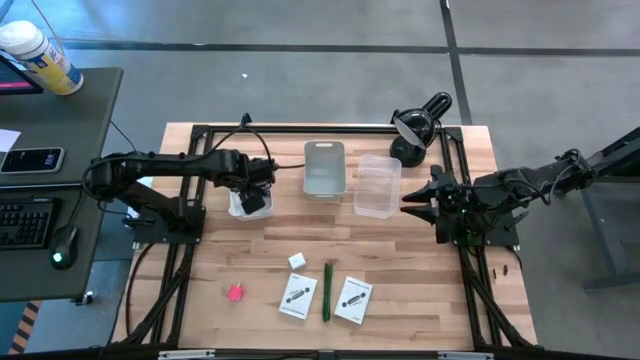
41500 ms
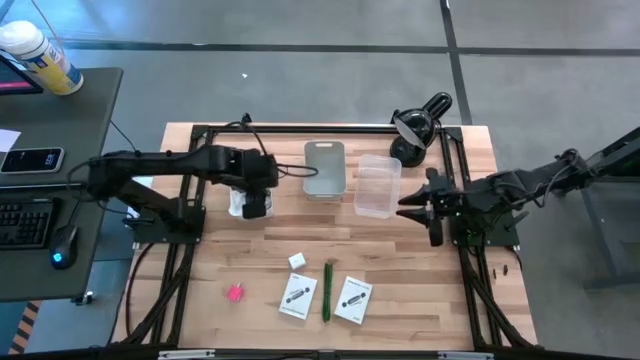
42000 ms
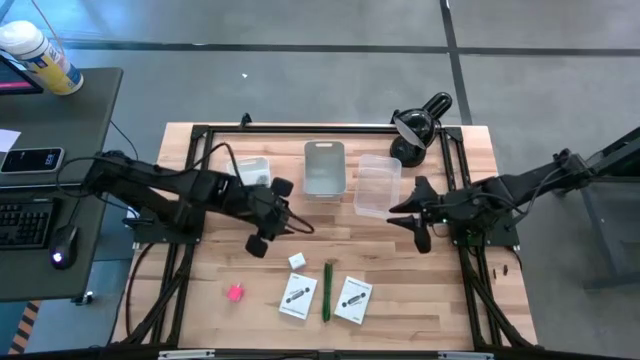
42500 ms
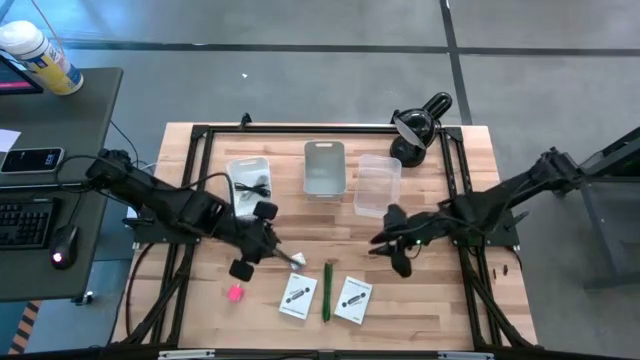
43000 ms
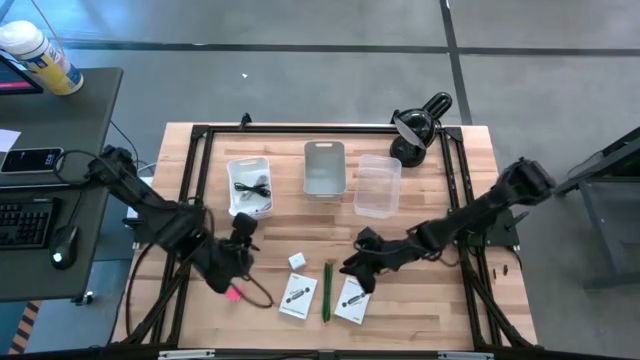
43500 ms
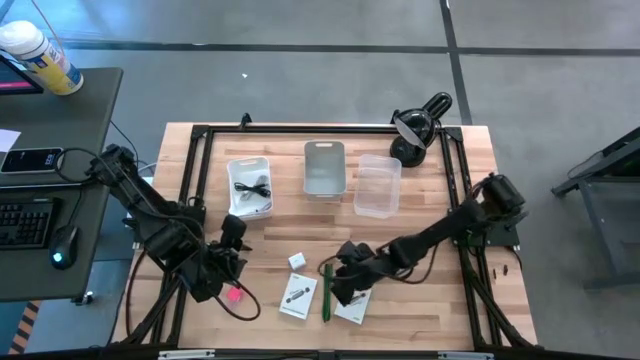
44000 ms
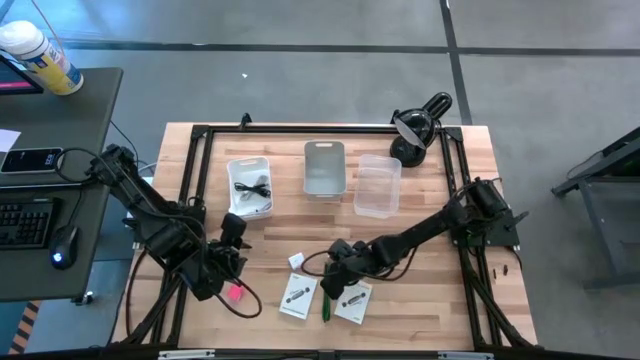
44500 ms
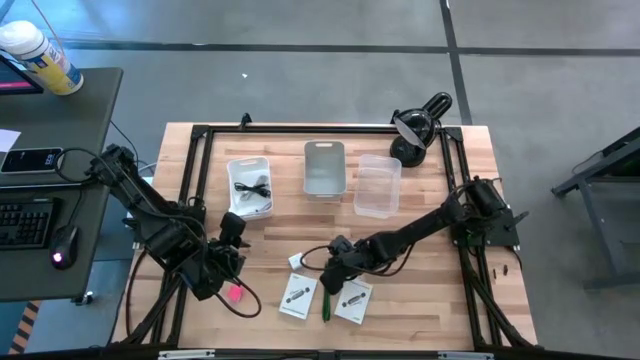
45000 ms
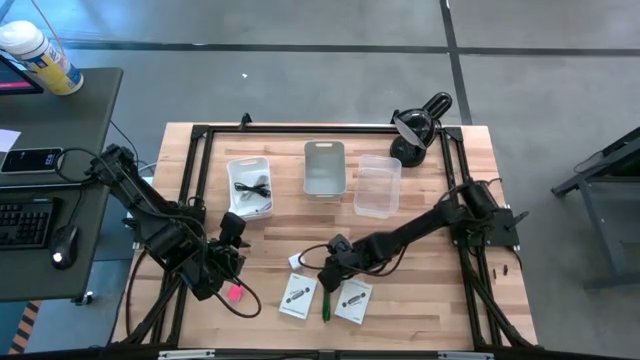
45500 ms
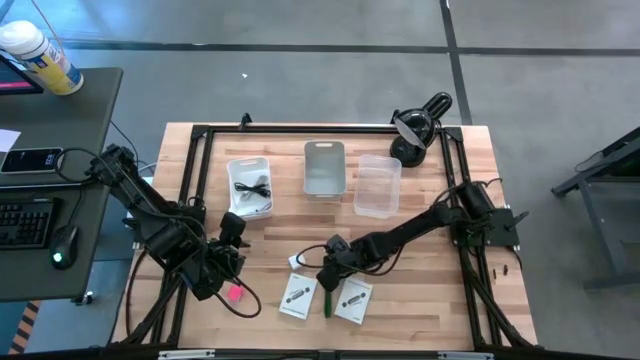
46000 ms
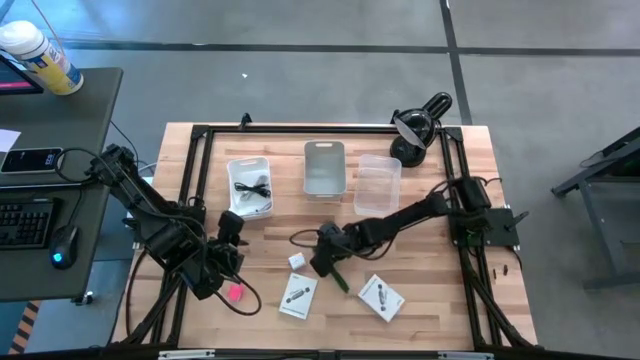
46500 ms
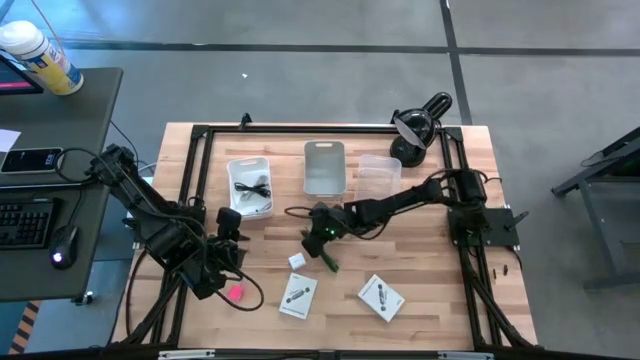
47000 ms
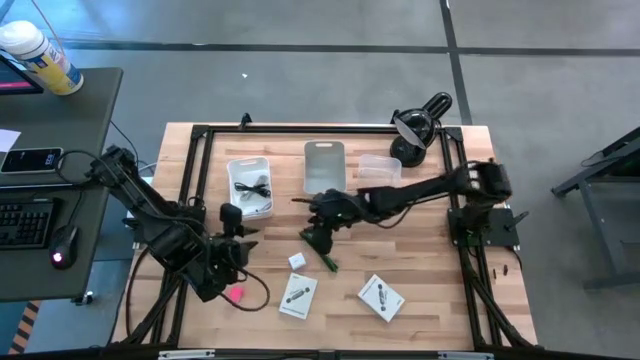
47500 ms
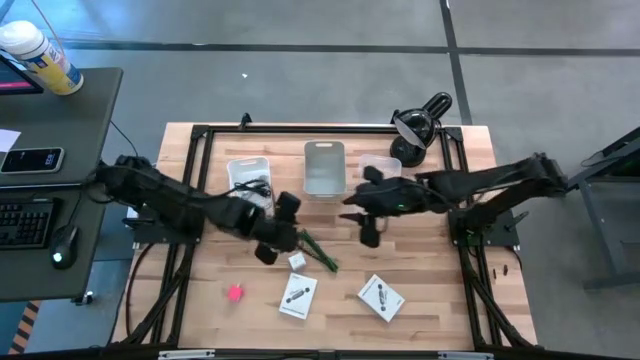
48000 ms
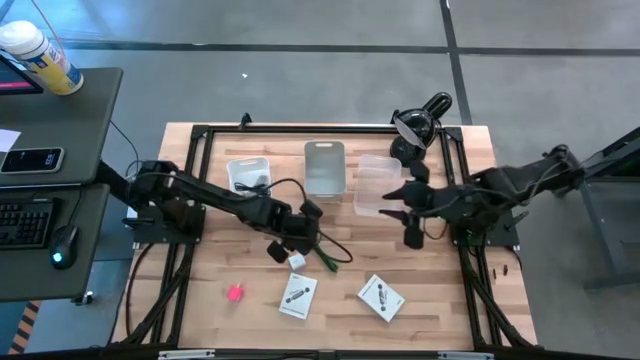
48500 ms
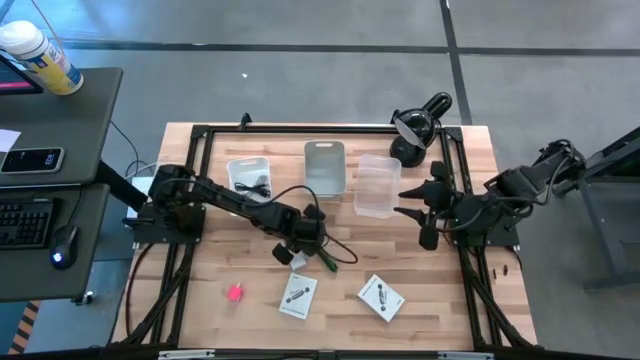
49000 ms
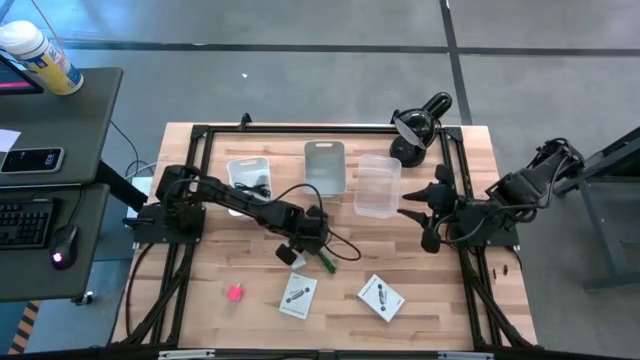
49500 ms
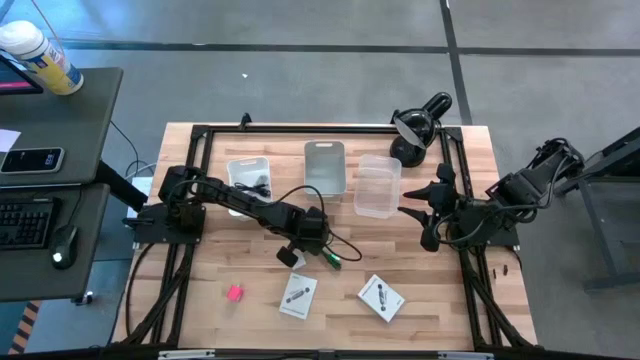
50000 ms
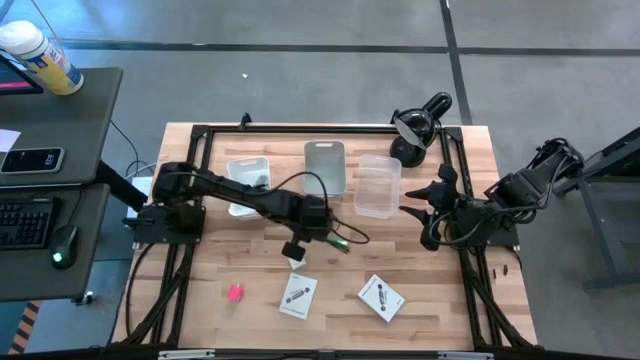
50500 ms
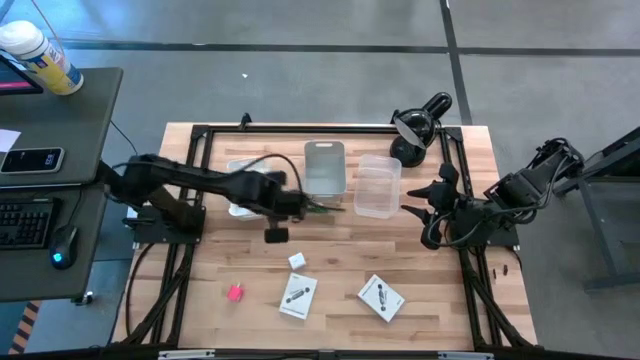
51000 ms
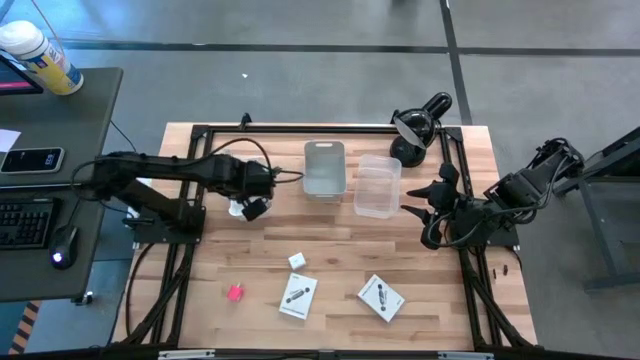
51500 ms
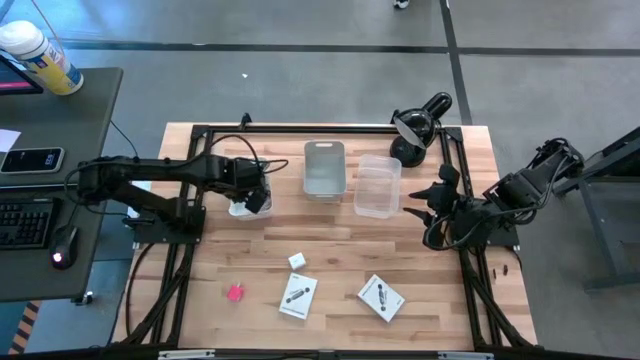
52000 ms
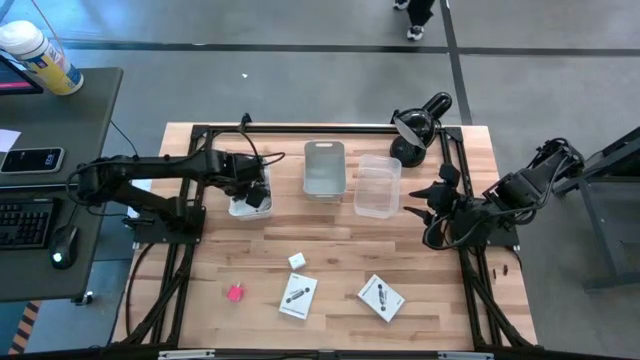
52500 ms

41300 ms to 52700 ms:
Task: Pick and place items into bin
Put the green USB cable into the white bin

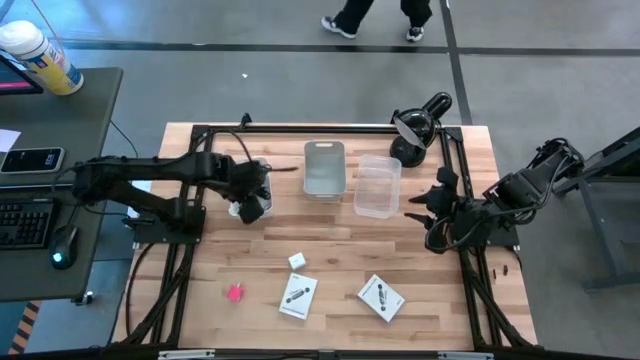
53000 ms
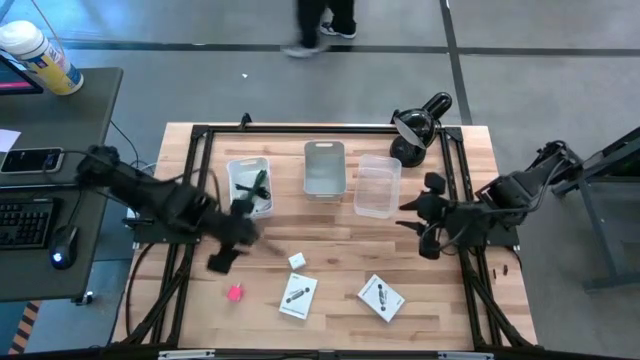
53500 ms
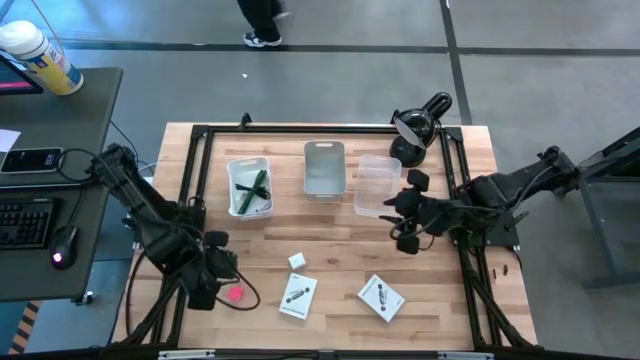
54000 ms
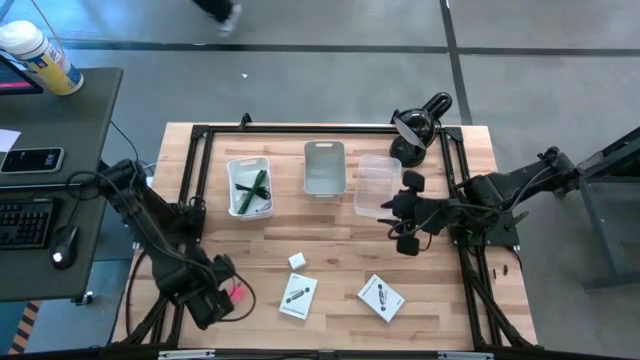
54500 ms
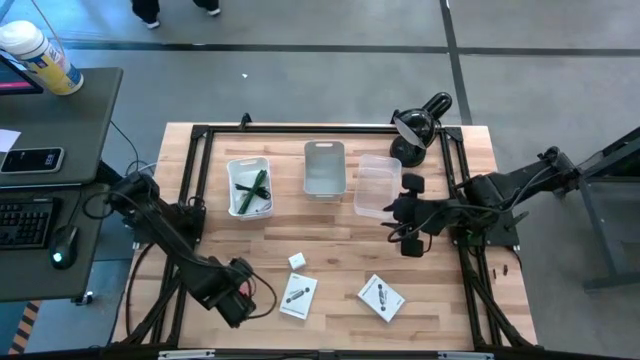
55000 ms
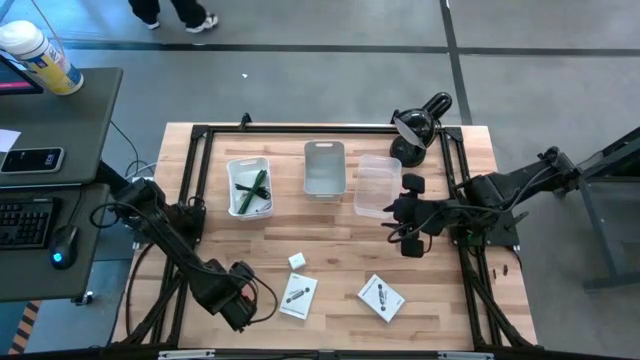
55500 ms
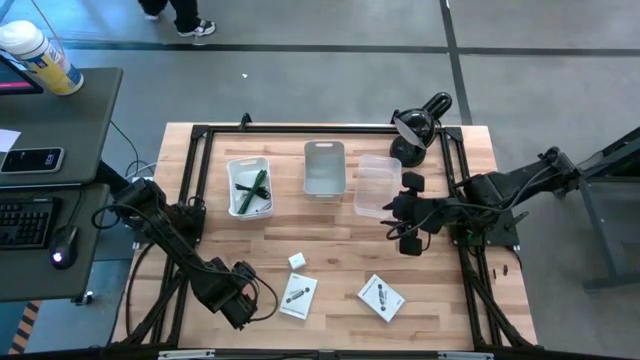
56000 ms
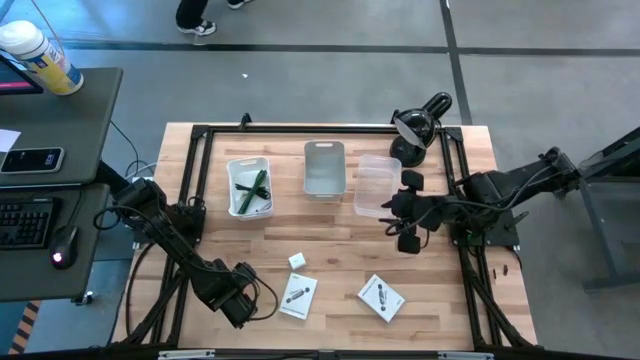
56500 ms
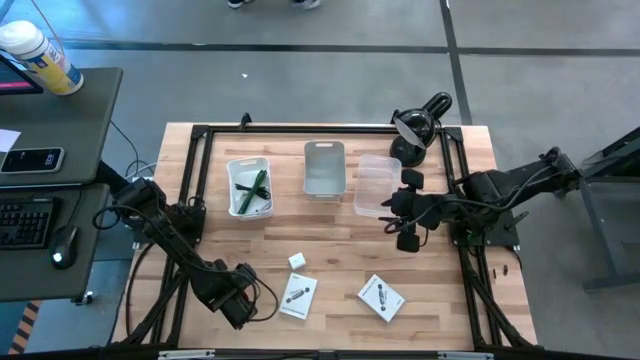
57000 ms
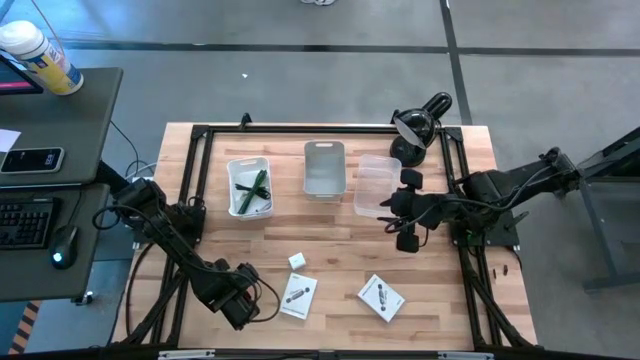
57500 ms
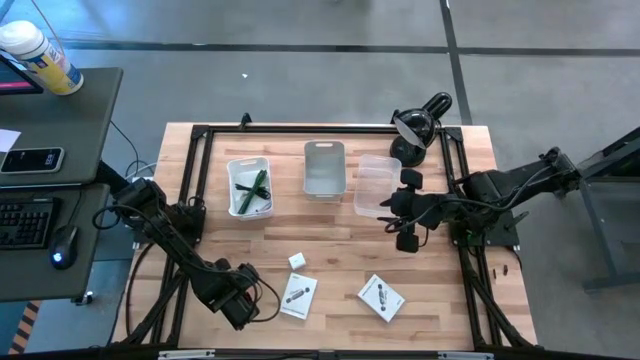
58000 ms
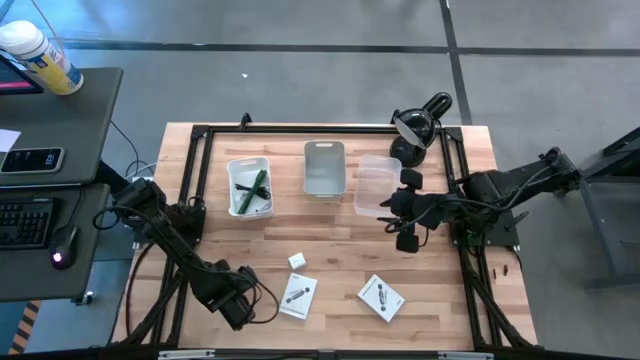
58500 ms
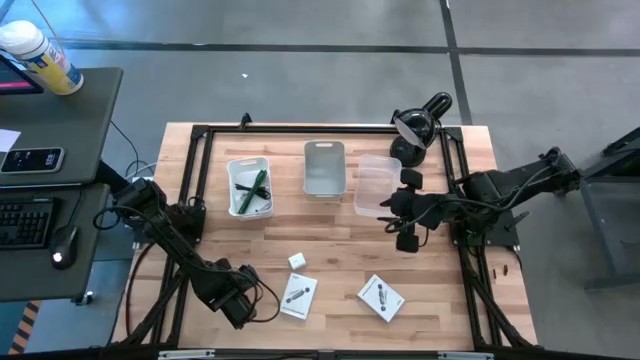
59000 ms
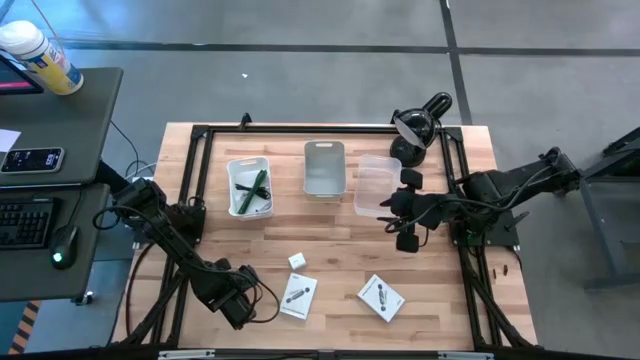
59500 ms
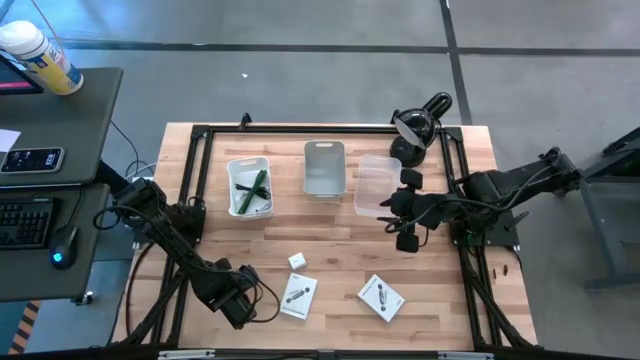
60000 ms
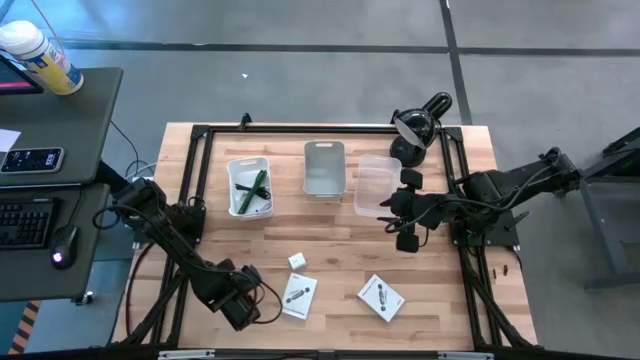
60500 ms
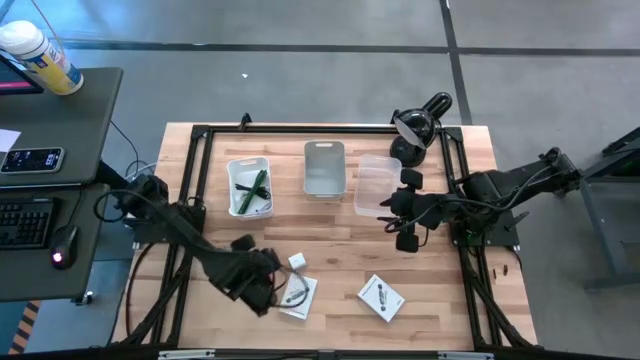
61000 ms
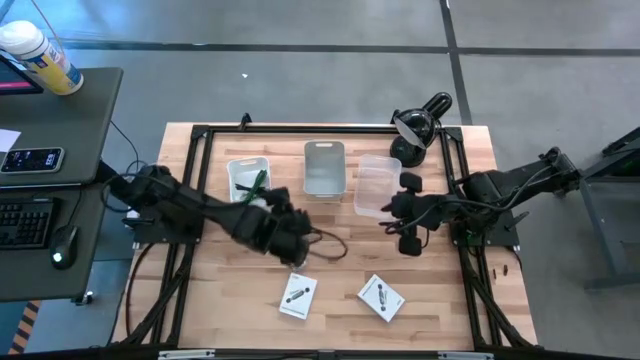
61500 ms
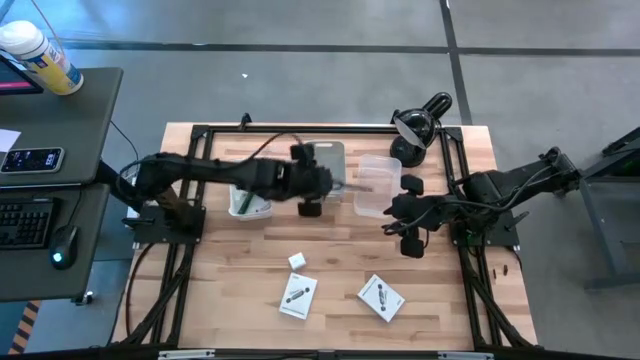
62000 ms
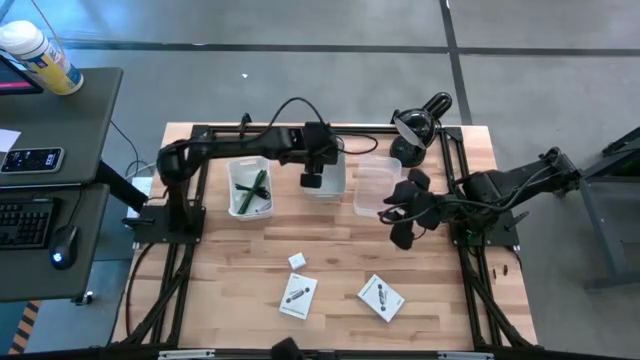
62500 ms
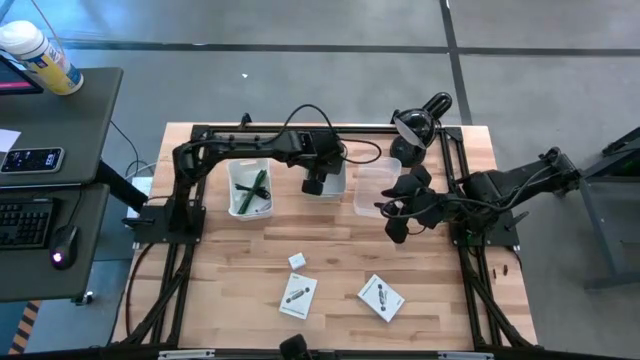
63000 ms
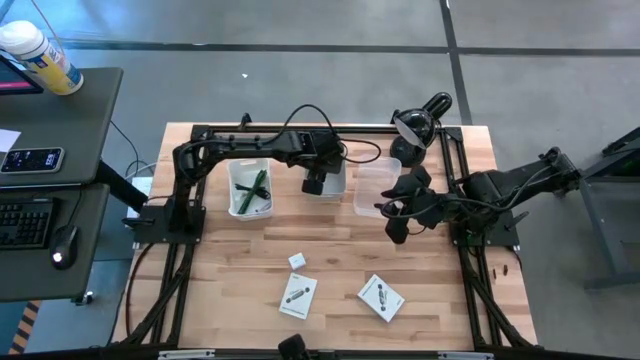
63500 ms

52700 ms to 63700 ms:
Put the pink charger adapter into the gray bin
